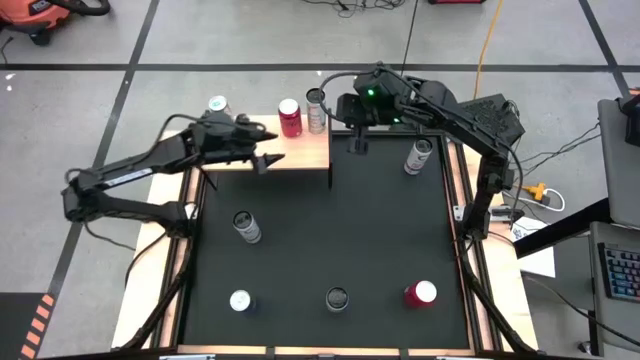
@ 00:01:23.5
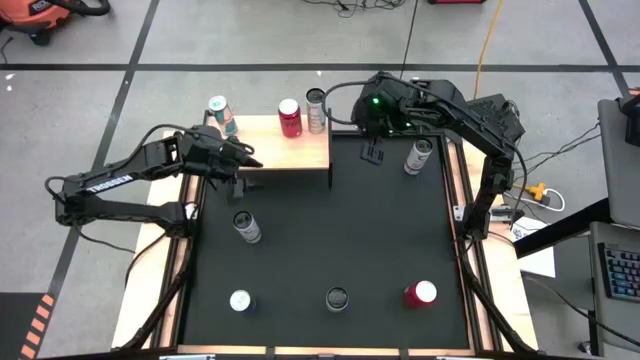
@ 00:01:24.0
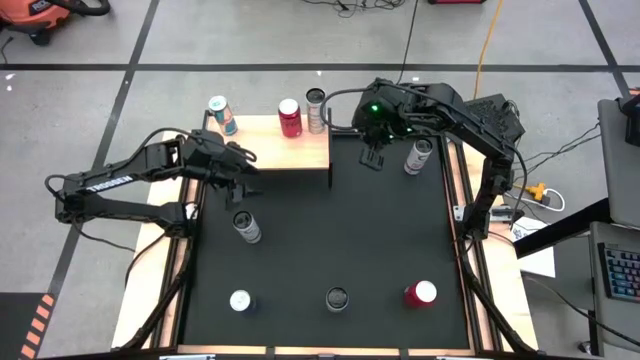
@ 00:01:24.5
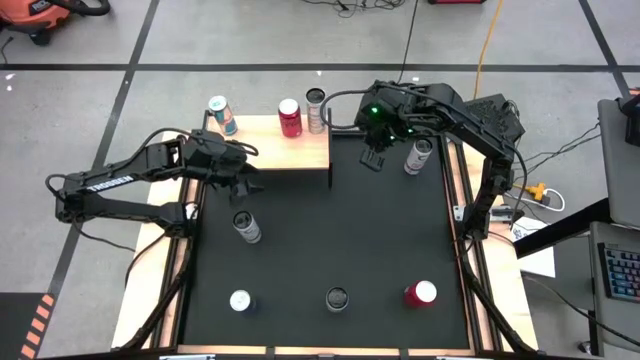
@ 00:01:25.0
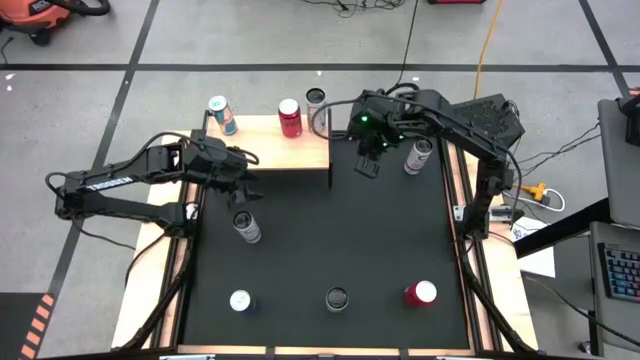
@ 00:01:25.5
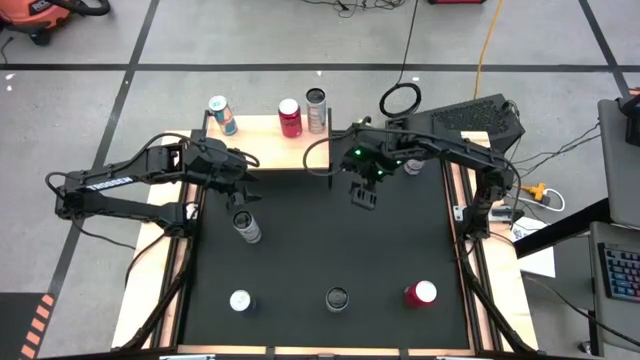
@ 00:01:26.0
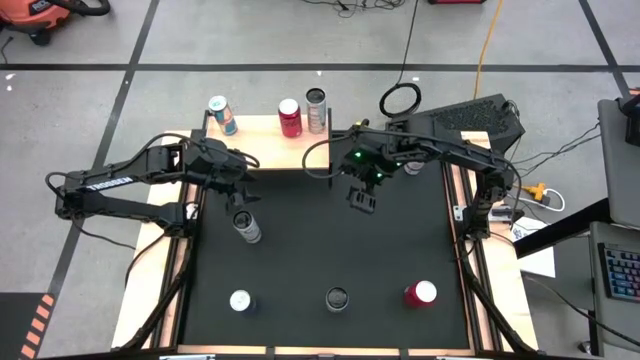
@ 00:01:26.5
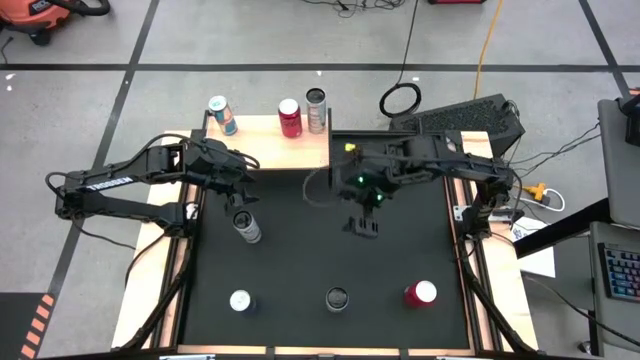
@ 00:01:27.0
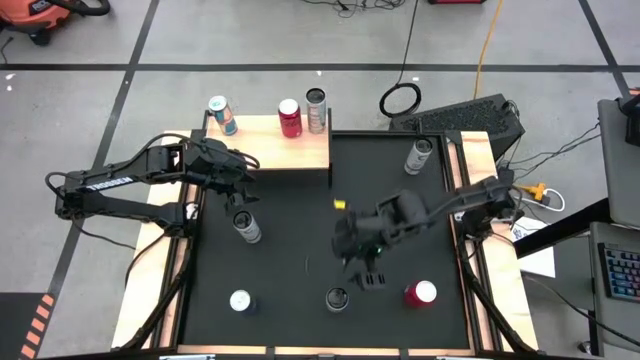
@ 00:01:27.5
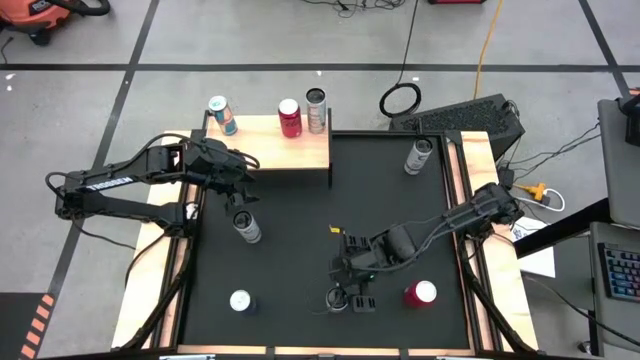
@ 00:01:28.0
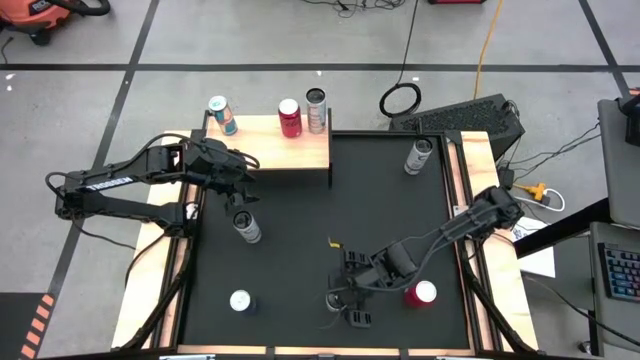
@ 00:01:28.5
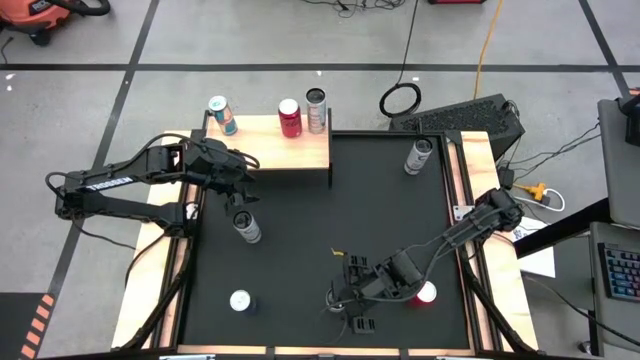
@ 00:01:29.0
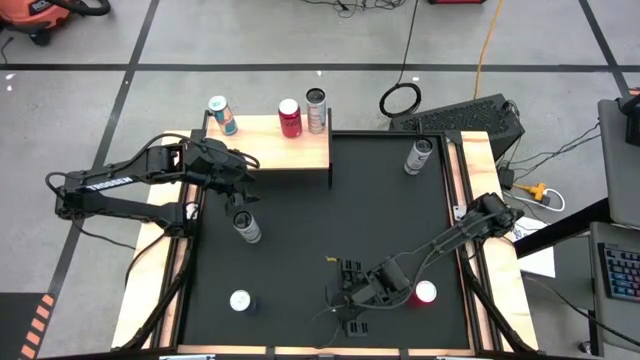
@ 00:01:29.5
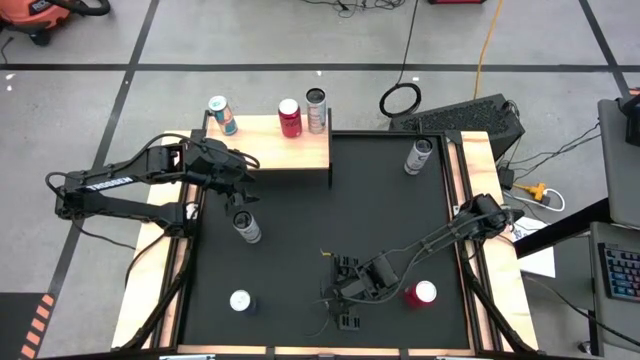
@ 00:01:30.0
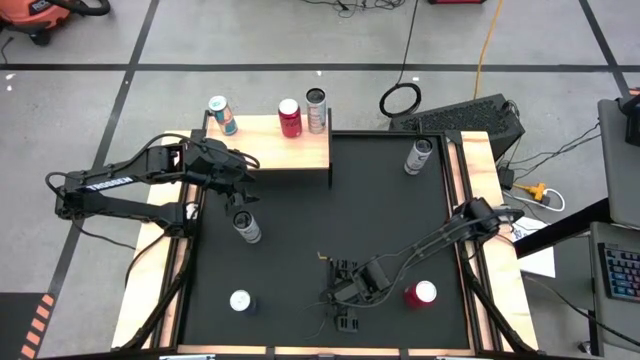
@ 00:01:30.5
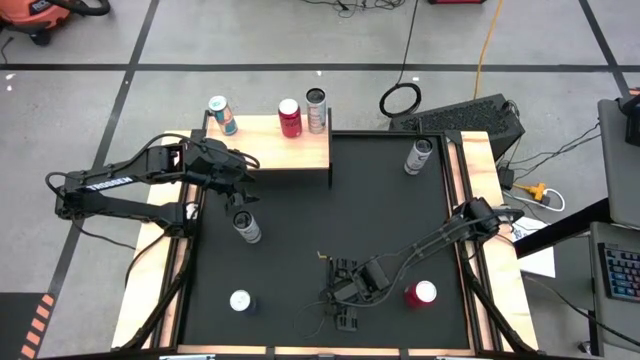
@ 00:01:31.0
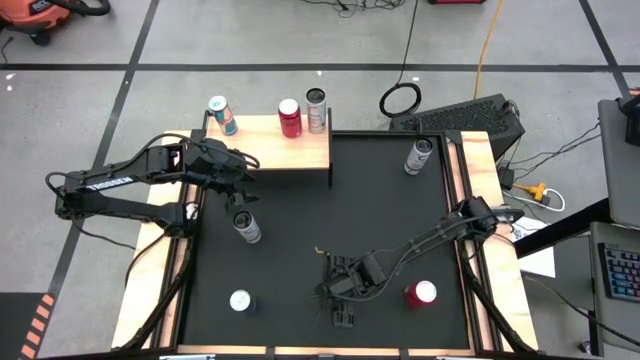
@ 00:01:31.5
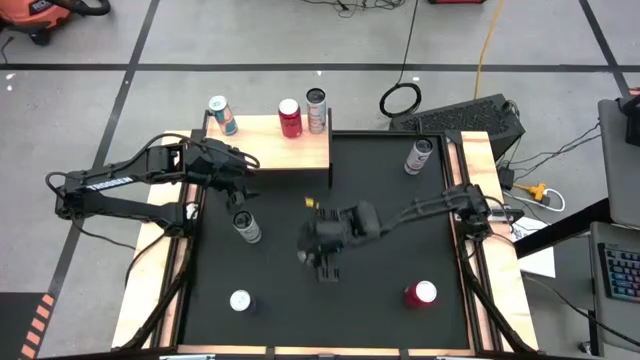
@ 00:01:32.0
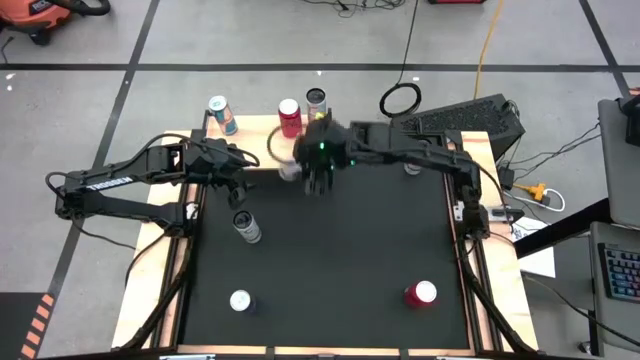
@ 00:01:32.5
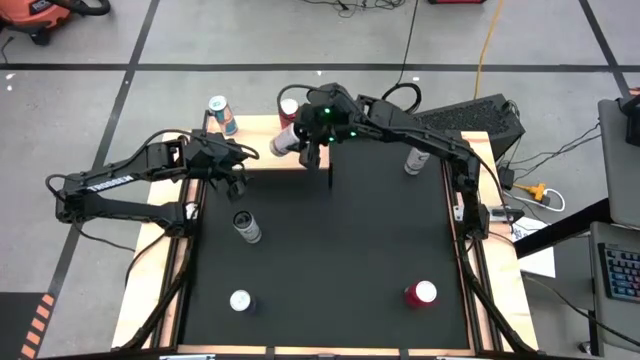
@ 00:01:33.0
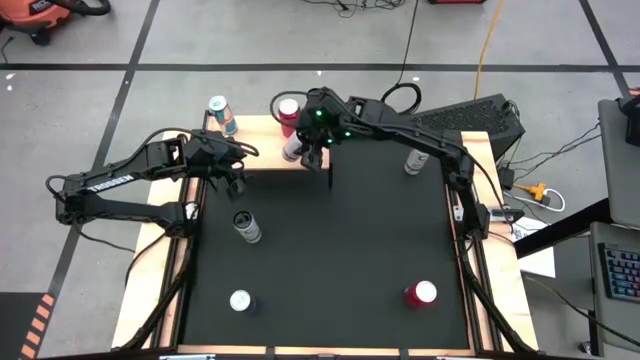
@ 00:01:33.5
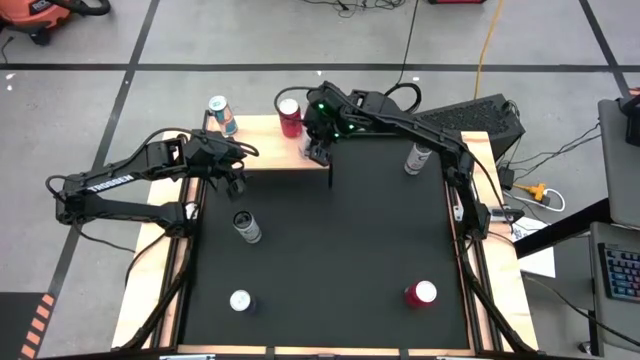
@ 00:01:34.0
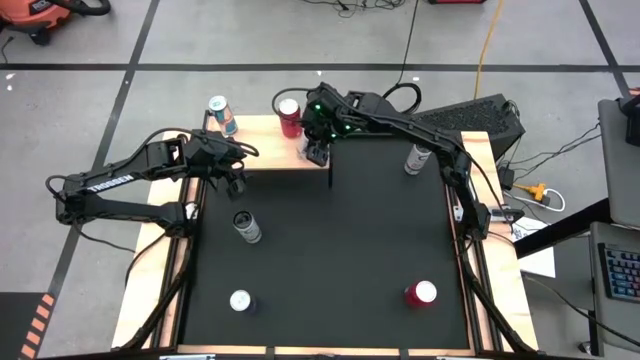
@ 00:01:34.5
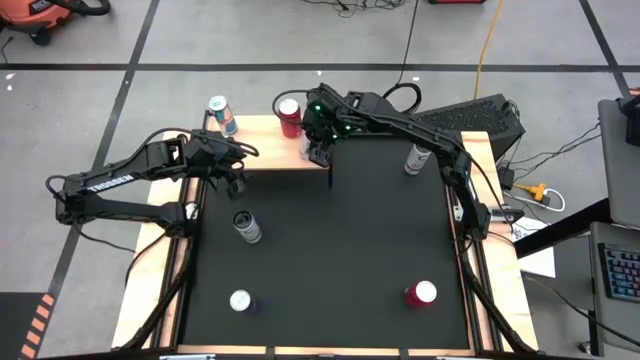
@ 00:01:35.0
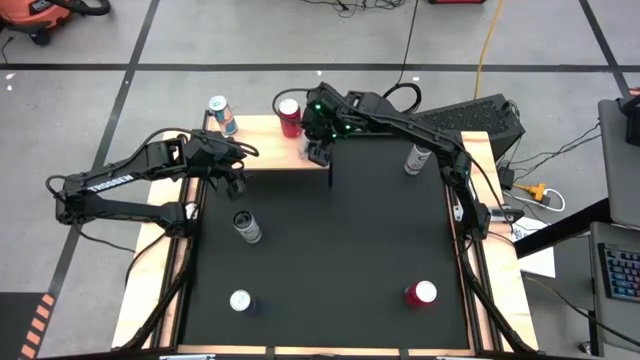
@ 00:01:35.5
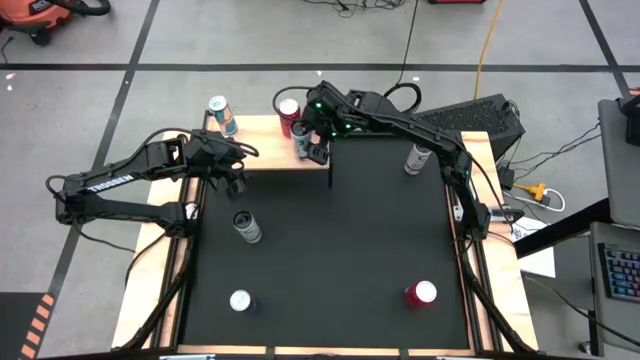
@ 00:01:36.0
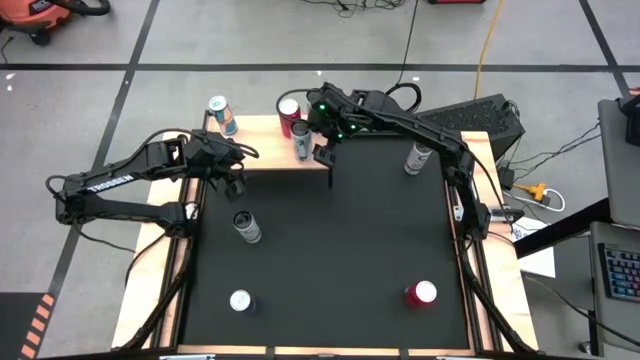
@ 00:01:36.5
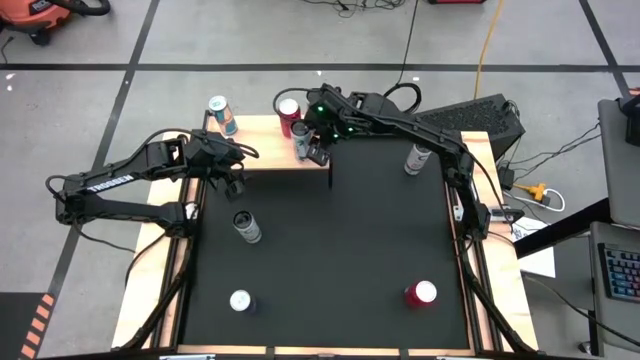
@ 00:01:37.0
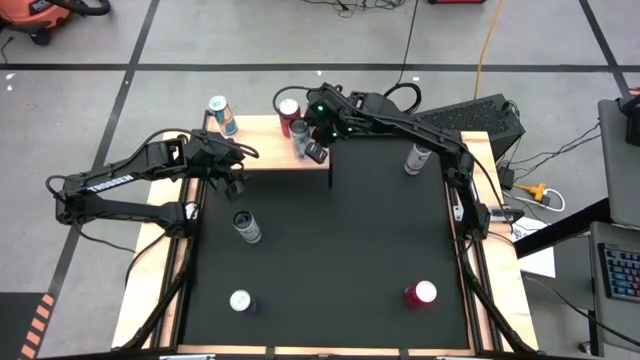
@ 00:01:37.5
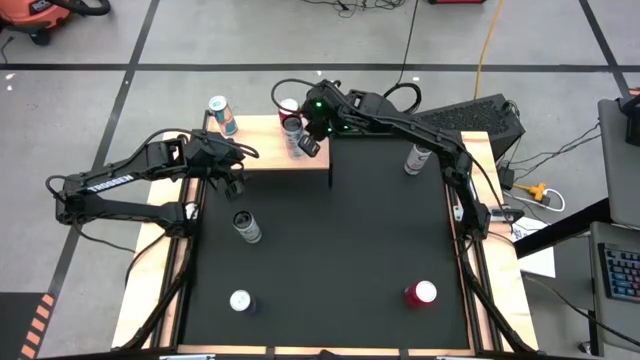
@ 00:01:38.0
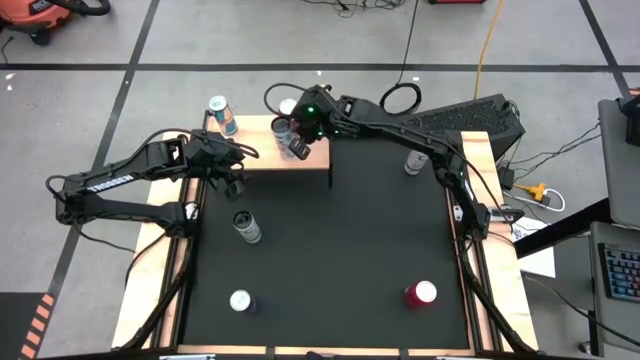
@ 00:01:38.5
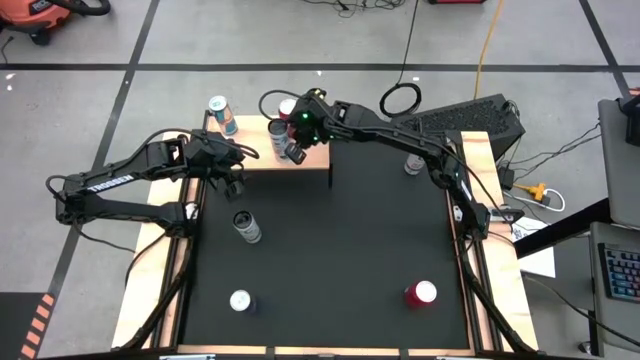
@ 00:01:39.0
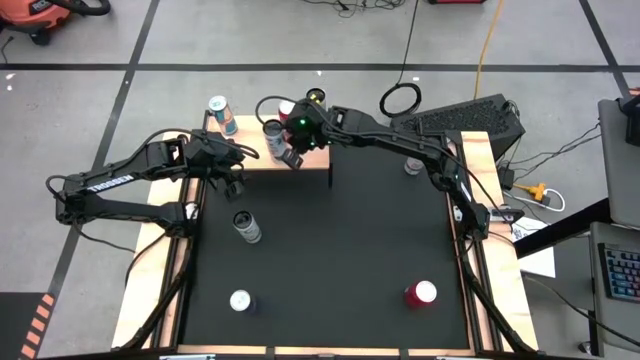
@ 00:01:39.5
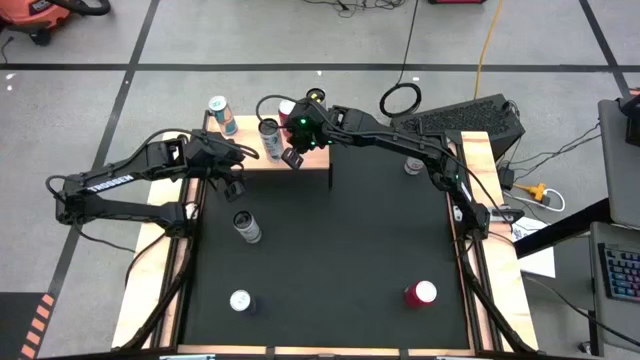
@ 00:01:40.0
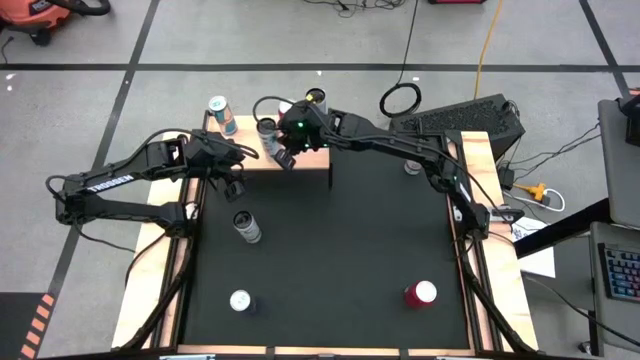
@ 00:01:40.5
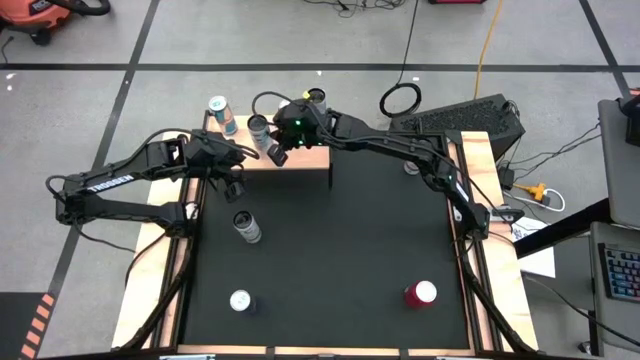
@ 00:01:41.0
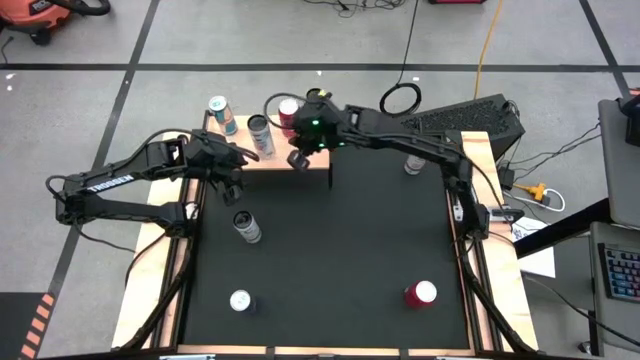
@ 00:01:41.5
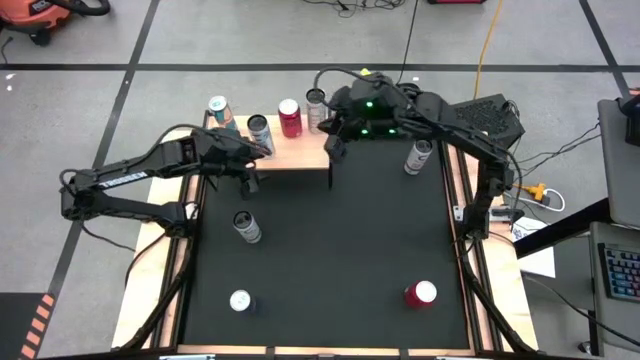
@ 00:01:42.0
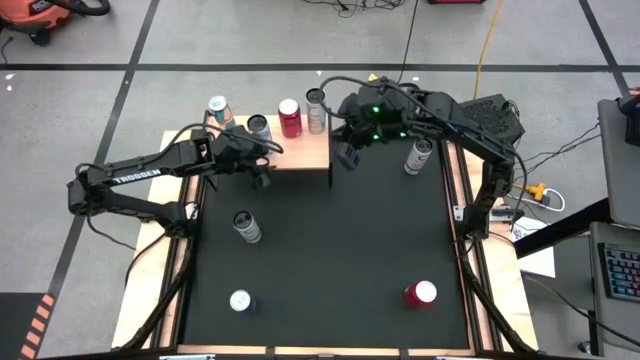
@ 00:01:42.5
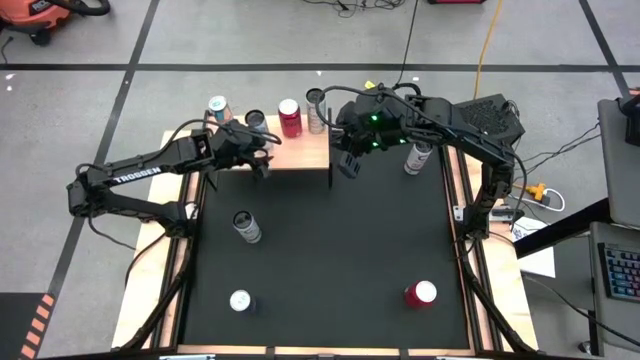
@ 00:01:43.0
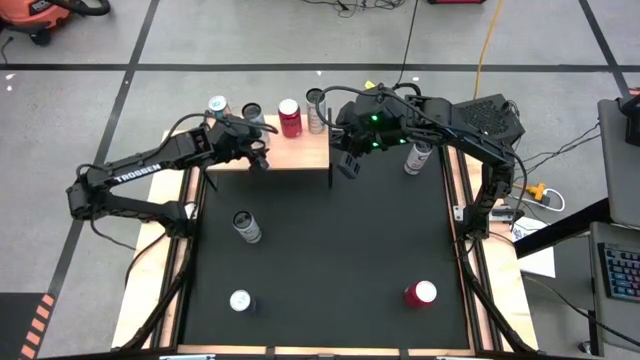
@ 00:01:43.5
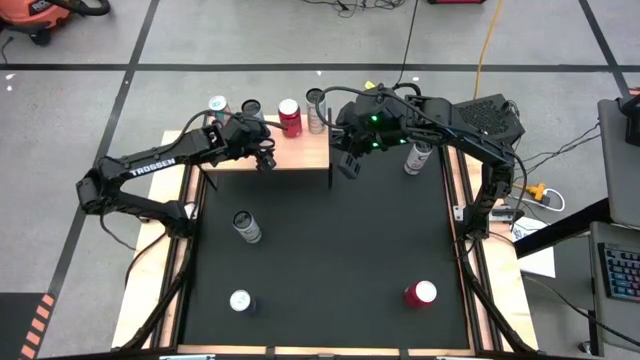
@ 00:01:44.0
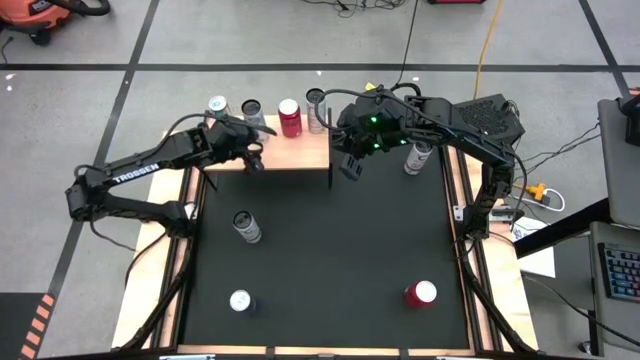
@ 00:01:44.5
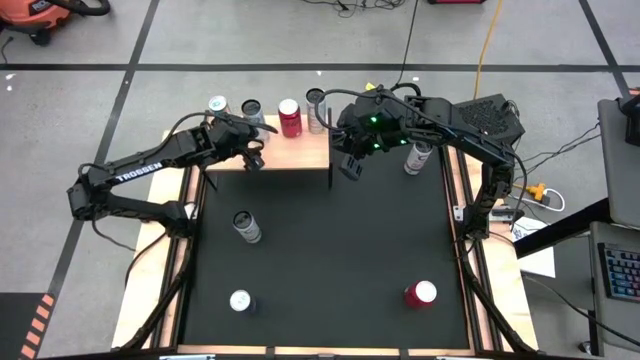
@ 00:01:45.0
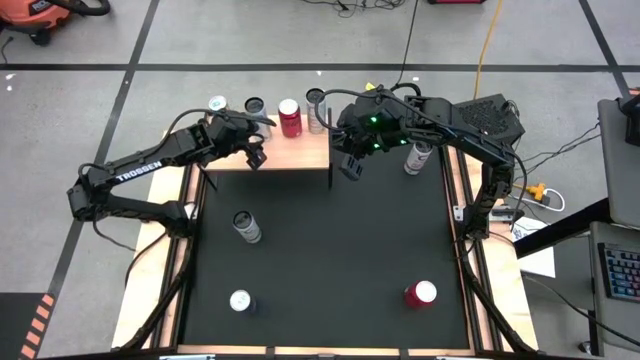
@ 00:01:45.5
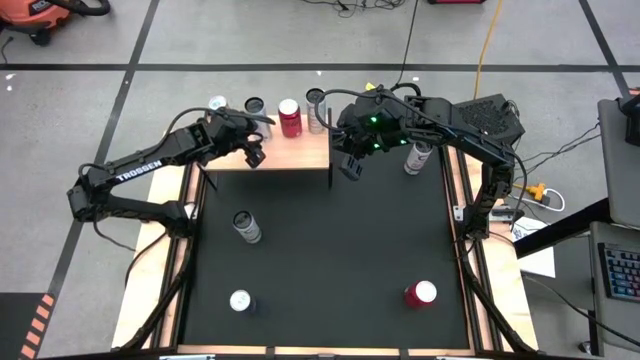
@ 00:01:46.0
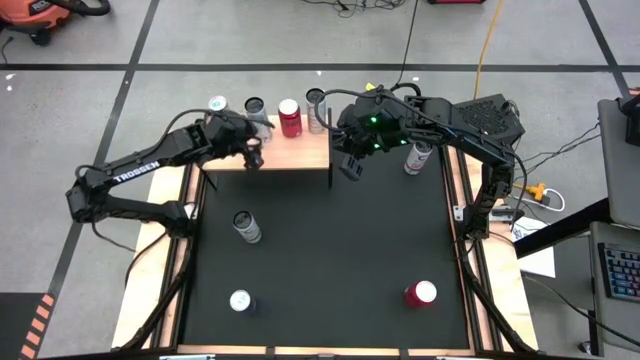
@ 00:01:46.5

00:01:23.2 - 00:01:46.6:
Task: Place canned beverage on shelf
Put the white pink soda can on the shelf
